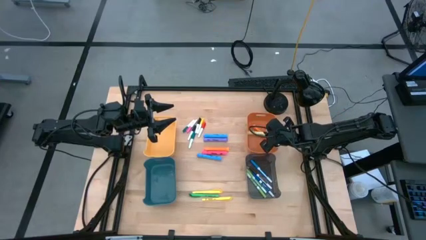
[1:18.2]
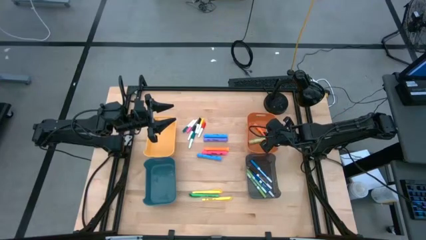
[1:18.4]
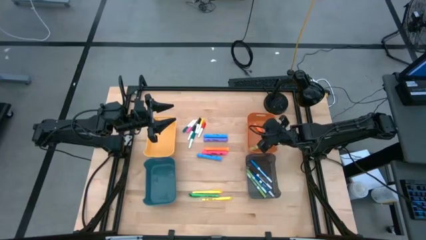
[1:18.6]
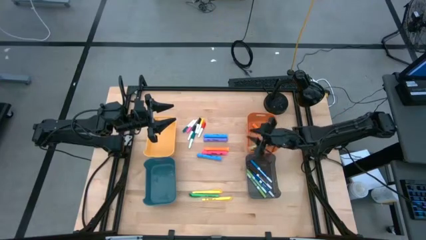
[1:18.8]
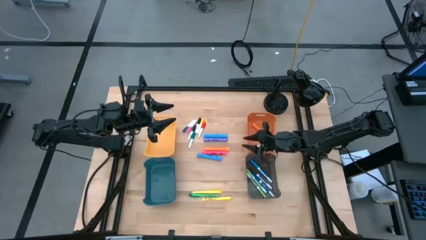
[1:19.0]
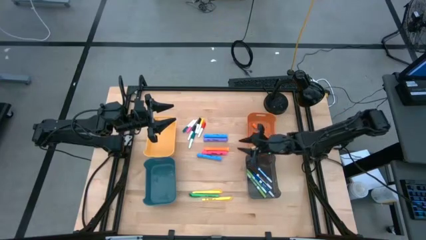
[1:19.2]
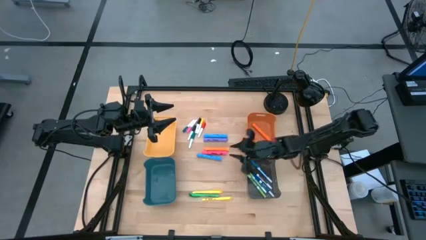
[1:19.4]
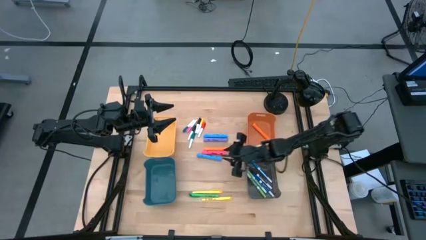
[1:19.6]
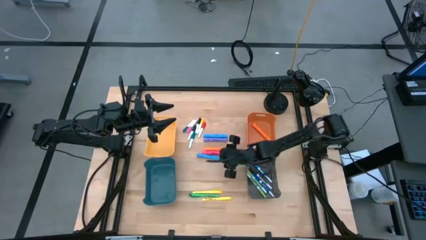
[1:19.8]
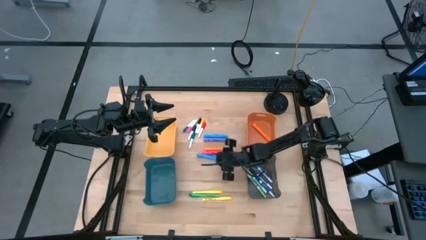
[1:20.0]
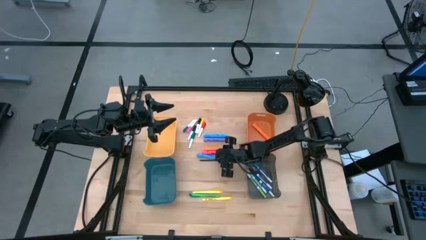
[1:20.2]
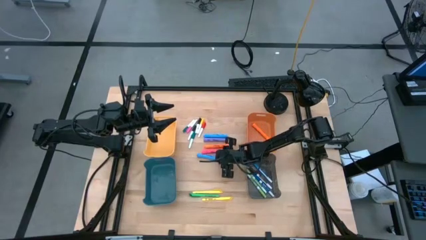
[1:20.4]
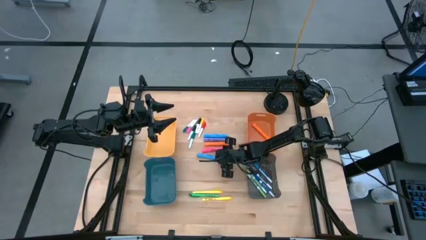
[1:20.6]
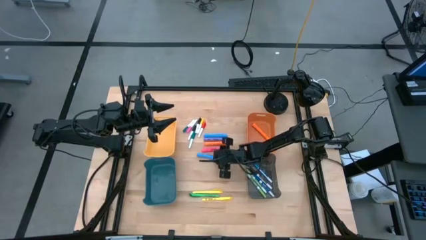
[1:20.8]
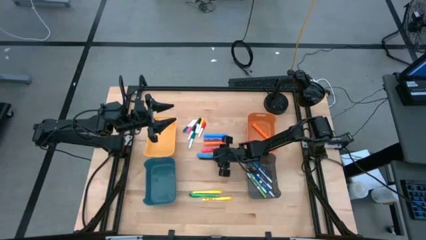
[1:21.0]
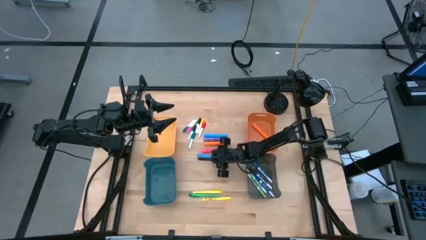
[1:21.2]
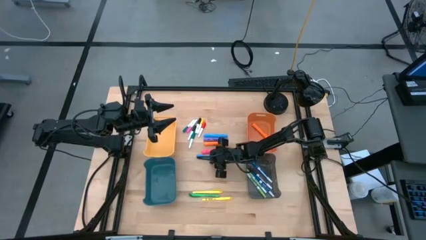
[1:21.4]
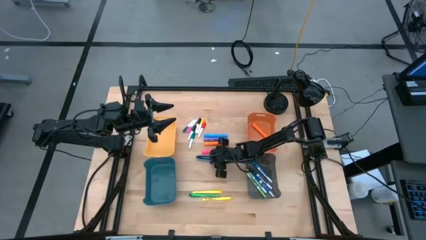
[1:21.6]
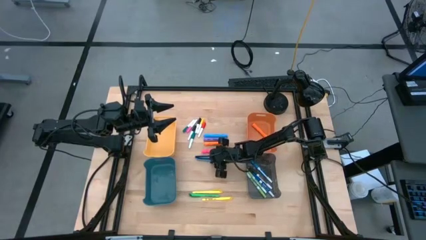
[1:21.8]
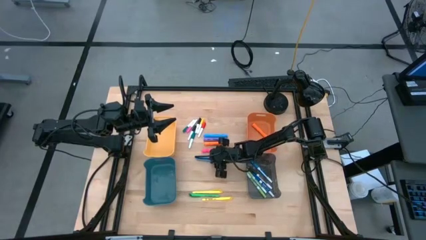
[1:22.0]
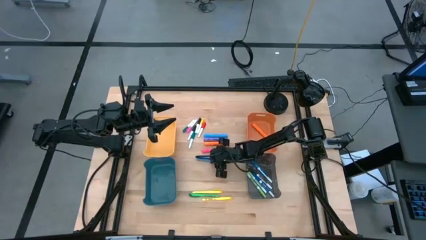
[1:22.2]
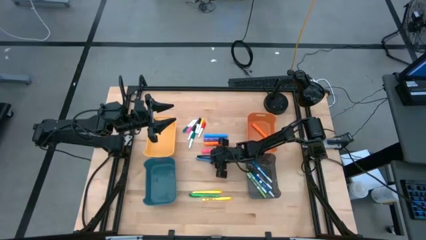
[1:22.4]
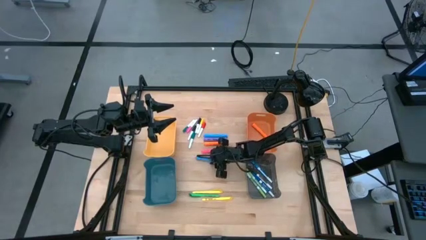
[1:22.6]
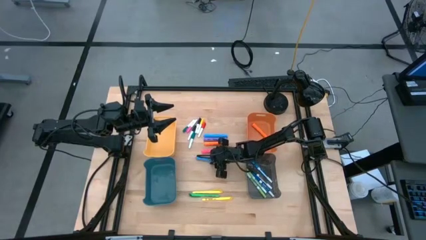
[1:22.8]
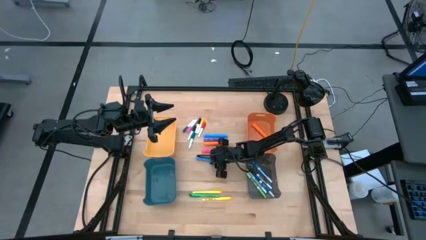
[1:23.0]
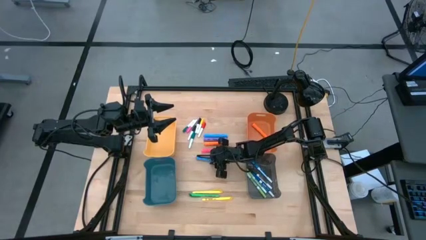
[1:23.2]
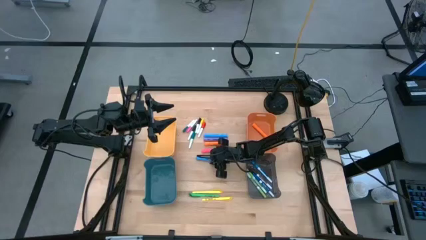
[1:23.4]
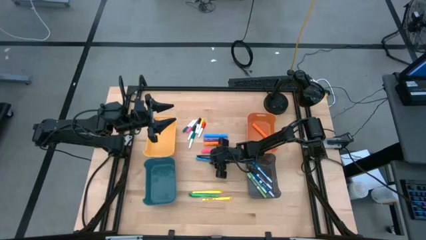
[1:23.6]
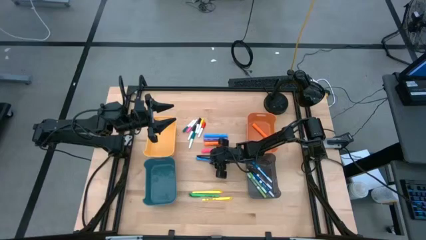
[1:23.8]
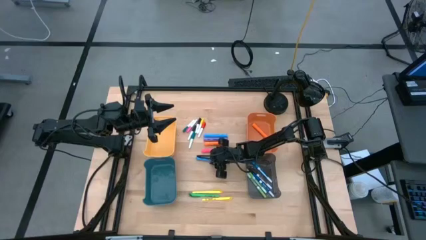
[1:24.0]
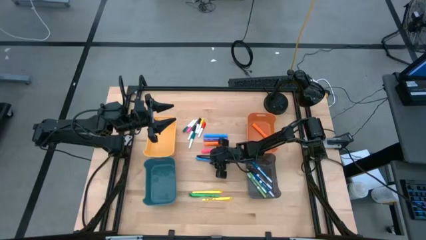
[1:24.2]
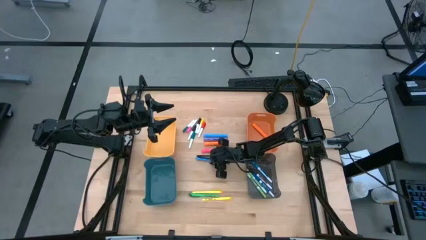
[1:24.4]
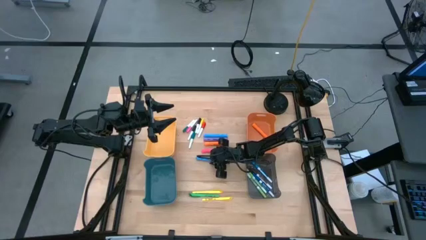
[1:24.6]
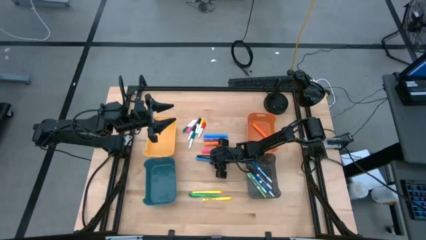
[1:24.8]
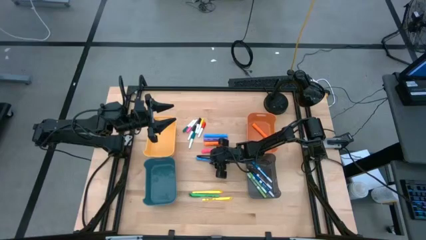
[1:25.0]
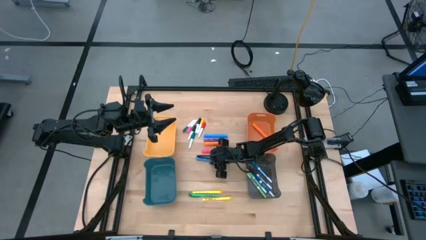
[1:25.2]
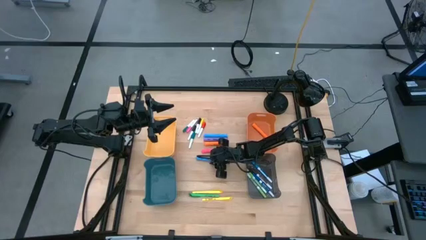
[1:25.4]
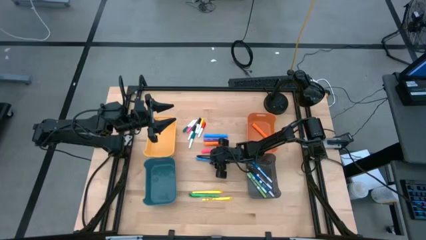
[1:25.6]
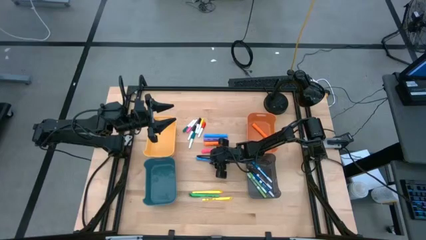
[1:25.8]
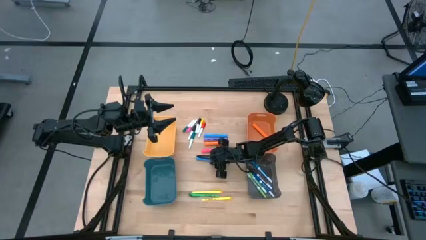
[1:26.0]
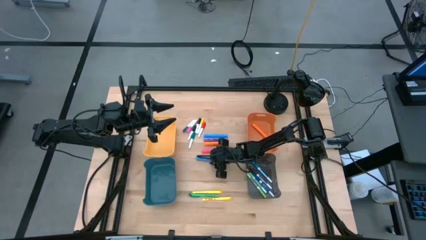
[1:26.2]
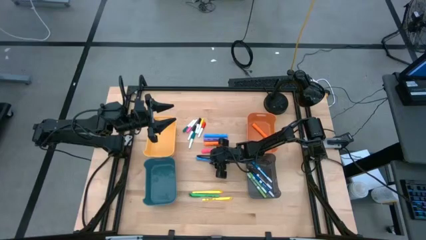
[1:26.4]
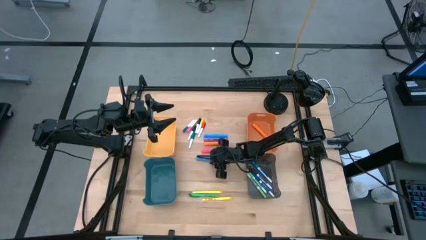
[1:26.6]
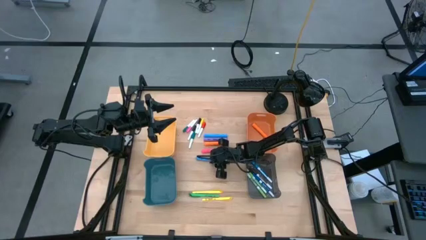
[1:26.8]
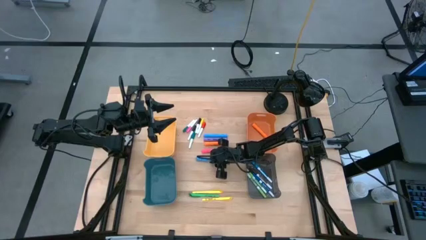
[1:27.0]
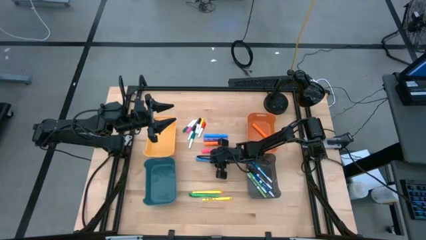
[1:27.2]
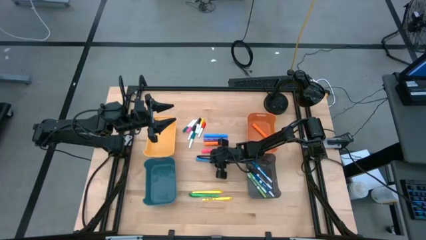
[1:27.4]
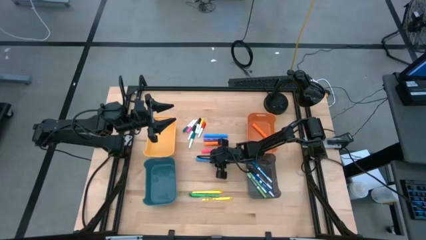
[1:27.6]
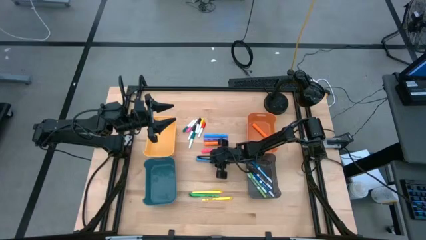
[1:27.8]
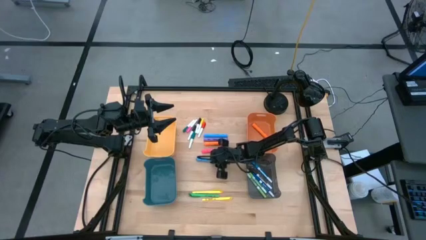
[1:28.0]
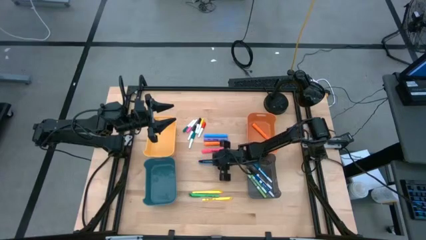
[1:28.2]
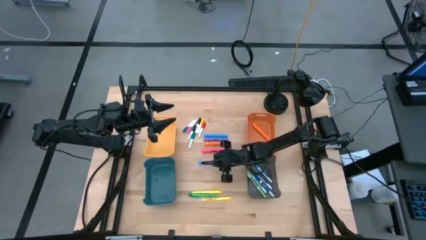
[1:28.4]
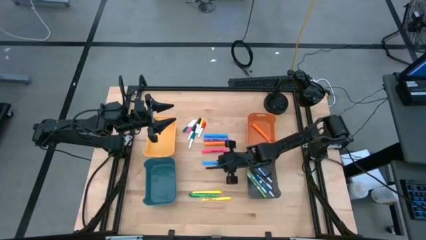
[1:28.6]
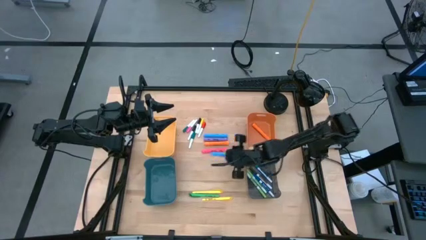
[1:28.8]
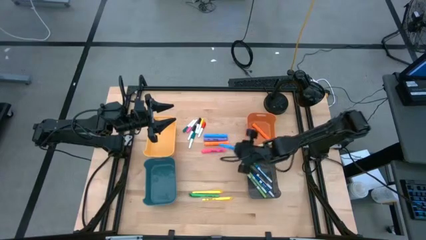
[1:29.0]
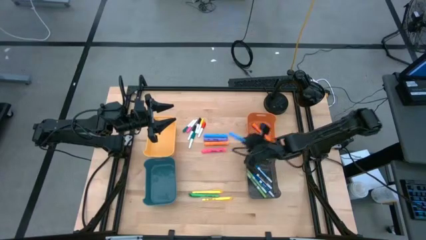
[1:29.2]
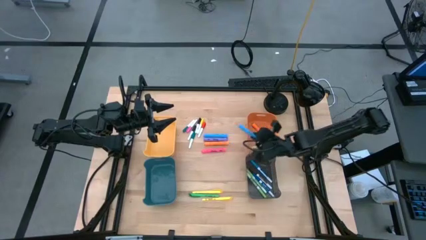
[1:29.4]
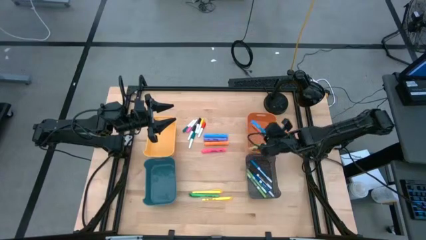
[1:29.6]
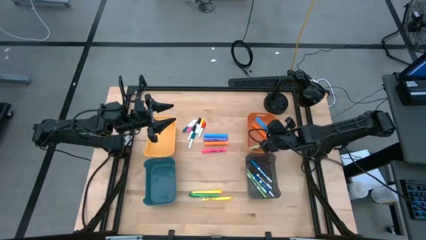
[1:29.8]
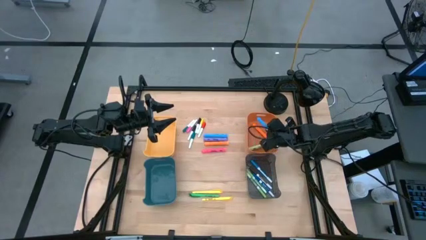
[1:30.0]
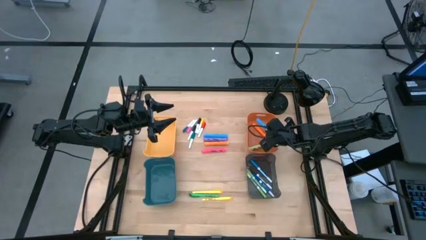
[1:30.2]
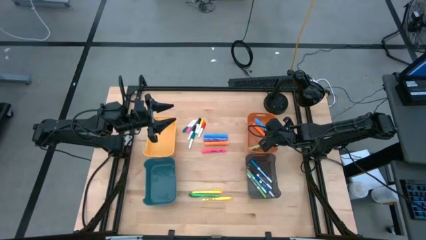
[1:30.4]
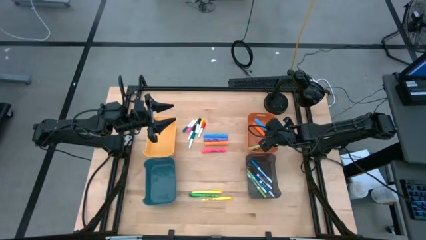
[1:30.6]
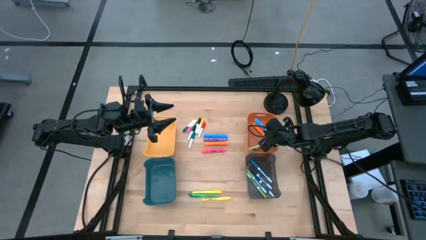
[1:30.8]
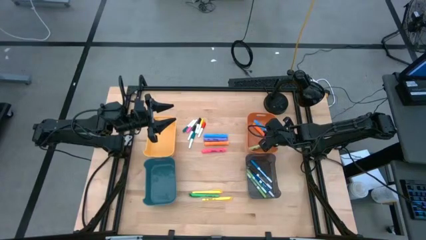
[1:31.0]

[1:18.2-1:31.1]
Task: Pick & Place Markers
Put the bottom blue highlighter into the orange bin

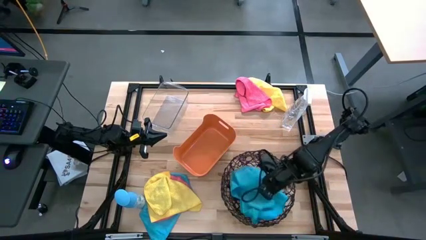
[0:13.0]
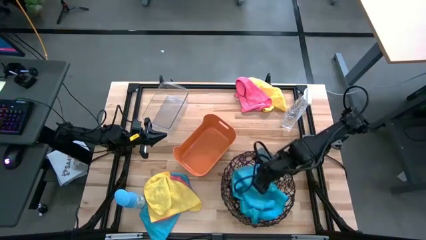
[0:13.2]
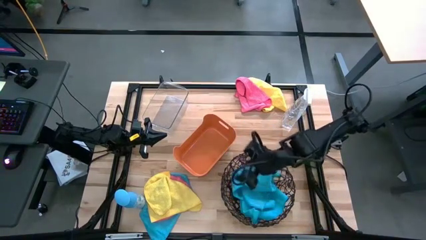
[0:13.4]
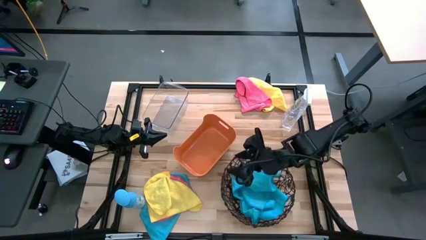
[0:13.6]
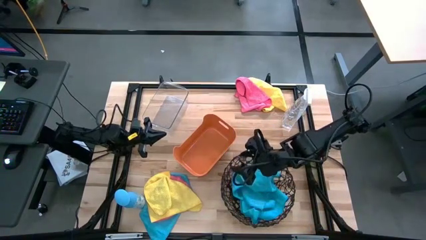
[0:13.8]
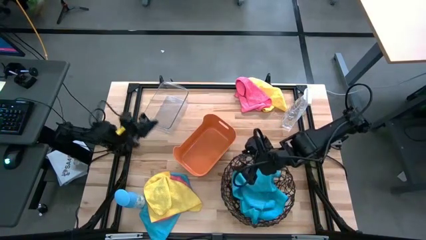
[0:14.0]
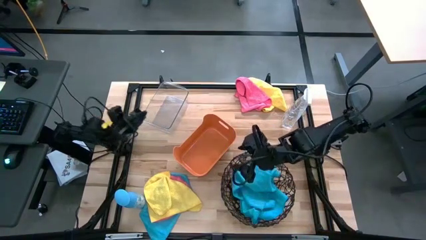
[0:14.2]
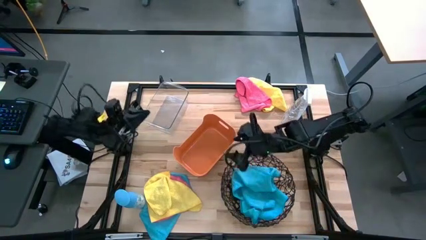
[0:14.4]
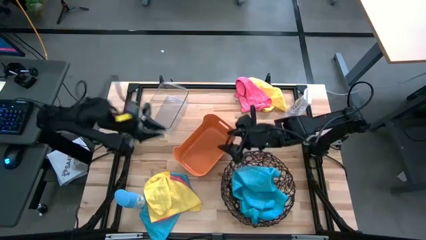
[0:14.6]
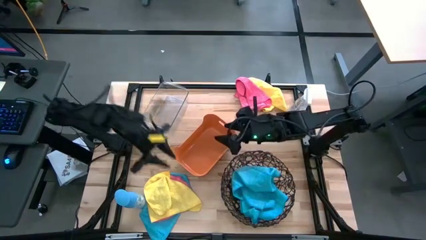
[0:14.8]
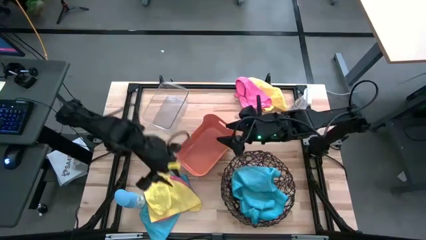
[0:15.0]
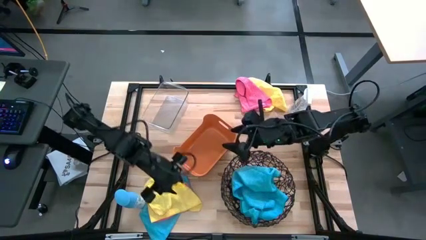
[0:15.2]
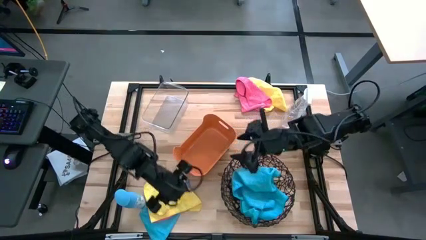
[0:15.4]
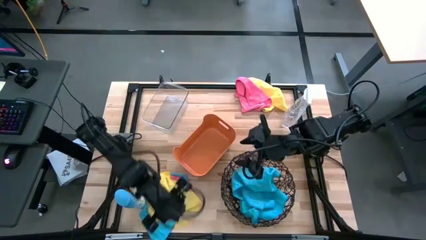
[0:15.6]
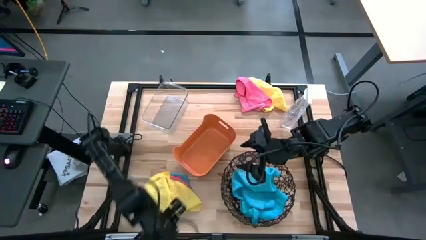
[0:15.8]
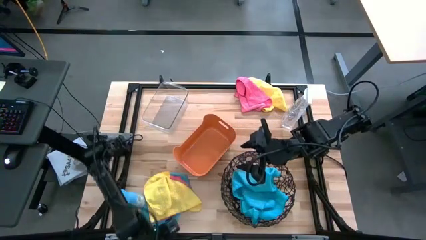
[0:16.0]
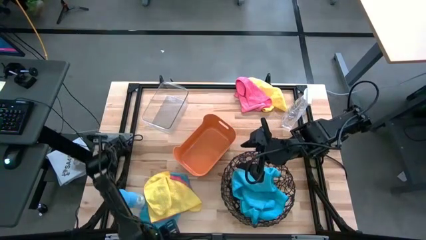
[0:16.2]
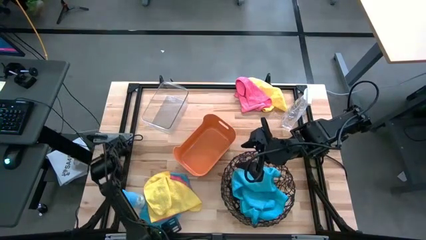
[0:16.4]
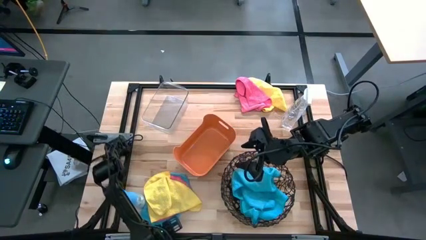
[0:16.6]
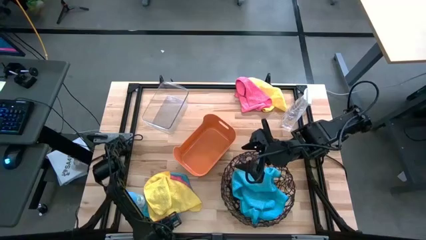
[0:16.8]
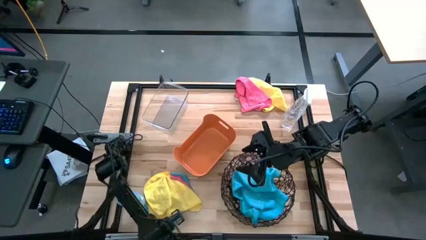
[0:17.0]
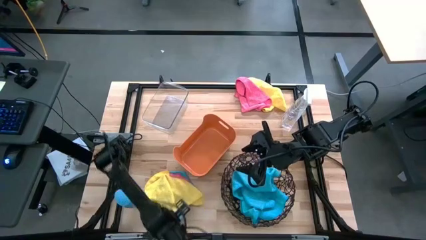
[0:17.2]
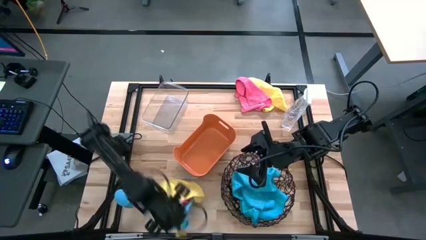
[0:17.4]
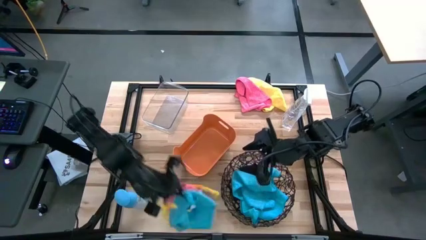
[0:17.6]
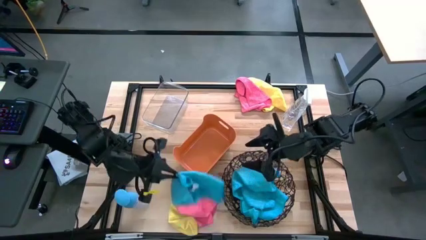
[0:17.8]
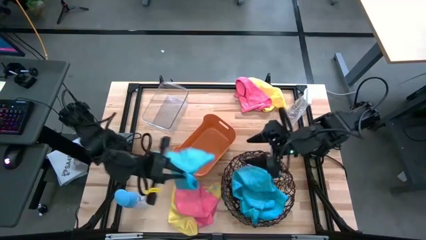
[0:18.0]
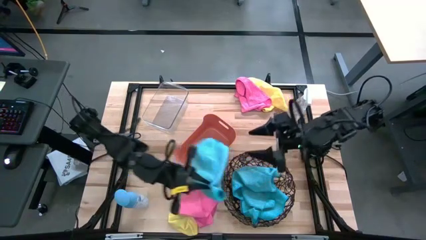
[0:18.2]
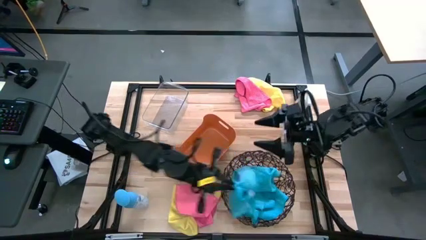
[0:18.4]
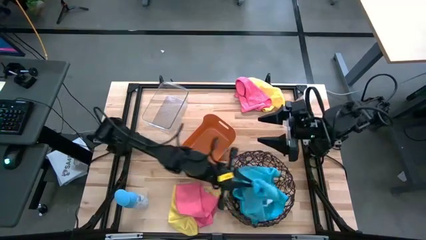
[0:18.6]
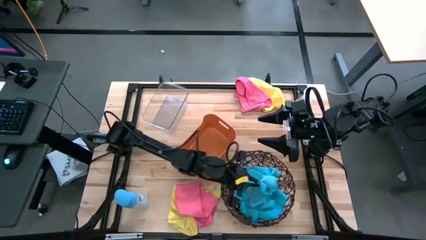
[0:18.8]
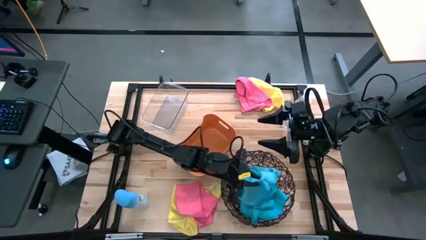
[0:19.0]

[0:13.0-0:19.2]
Task: Sort microfiber towel by color & place in baskets
Put the blue towel into the black wire basket
